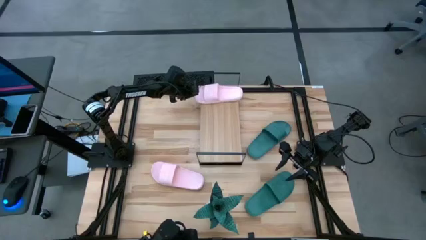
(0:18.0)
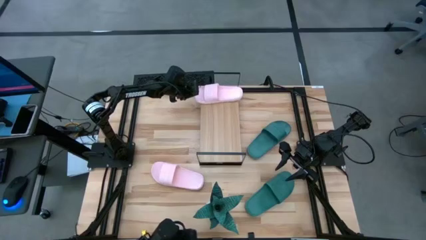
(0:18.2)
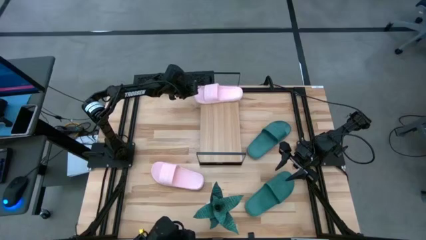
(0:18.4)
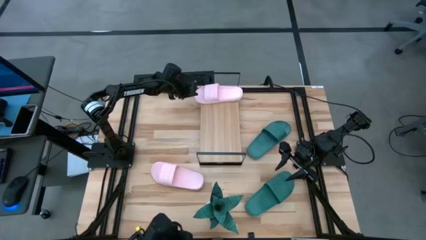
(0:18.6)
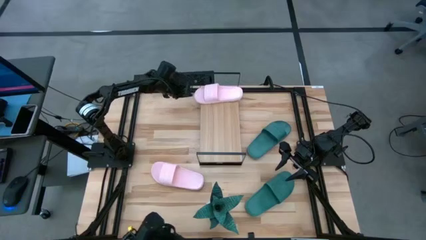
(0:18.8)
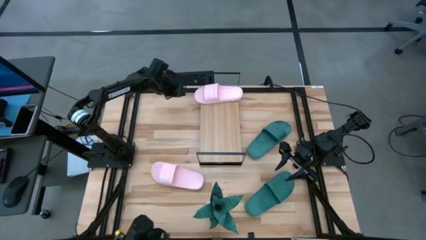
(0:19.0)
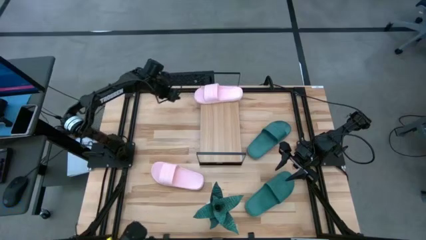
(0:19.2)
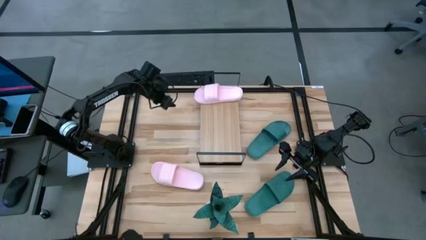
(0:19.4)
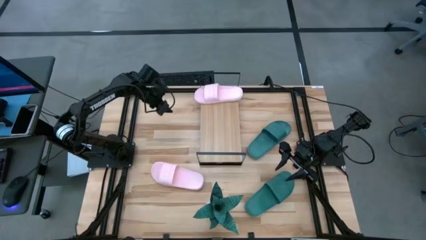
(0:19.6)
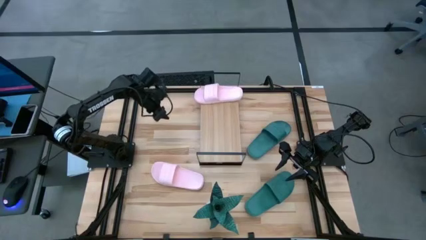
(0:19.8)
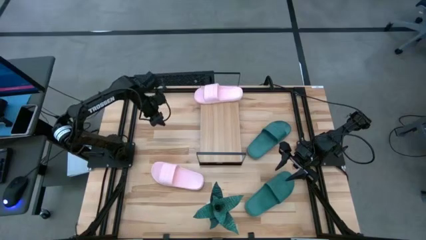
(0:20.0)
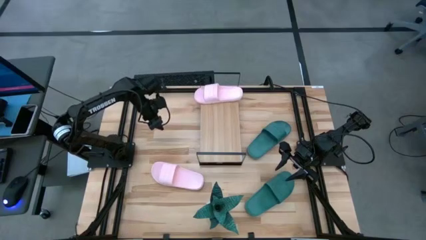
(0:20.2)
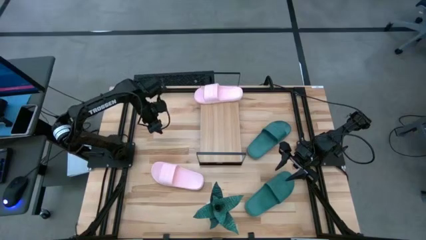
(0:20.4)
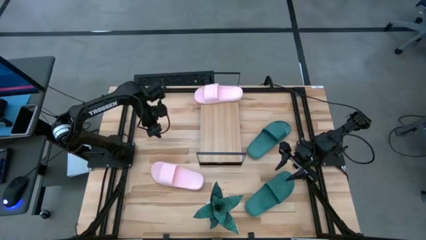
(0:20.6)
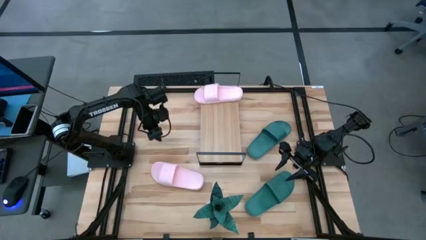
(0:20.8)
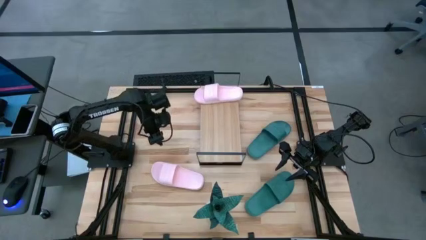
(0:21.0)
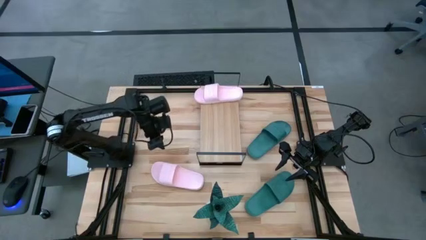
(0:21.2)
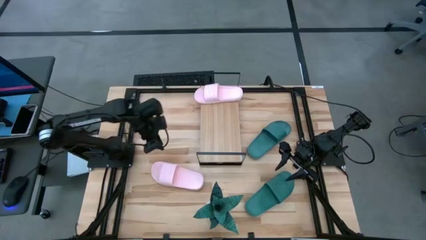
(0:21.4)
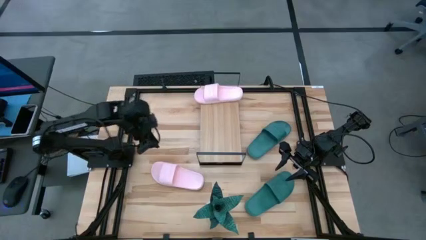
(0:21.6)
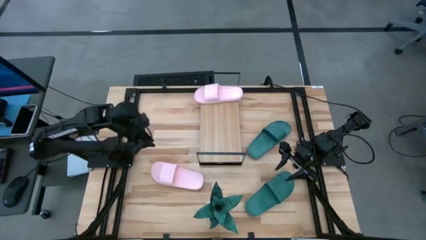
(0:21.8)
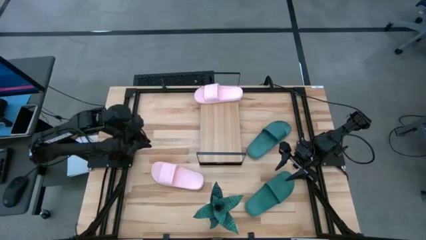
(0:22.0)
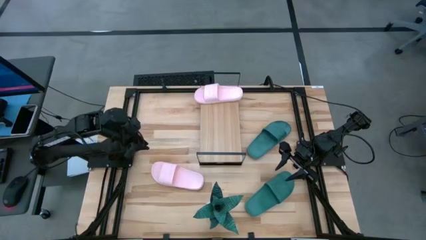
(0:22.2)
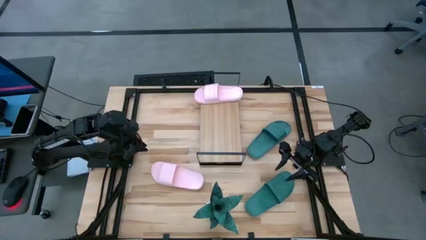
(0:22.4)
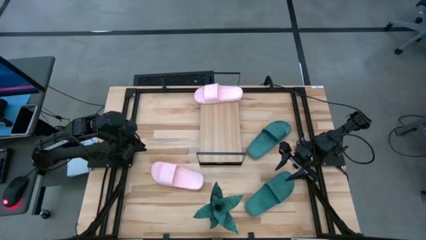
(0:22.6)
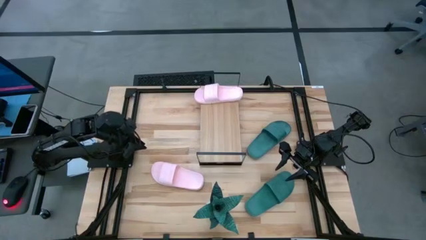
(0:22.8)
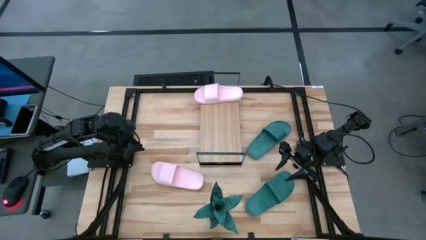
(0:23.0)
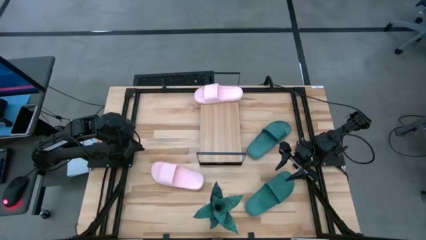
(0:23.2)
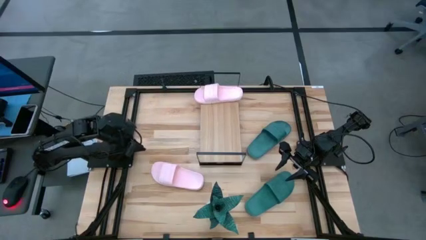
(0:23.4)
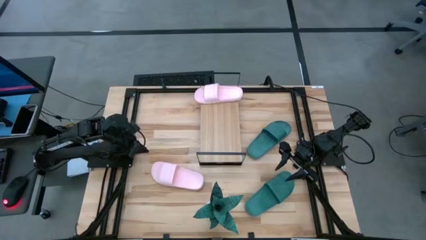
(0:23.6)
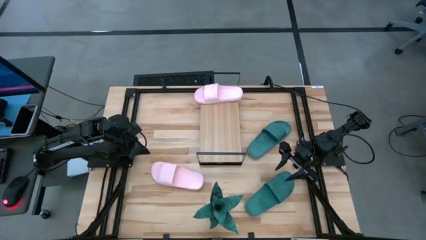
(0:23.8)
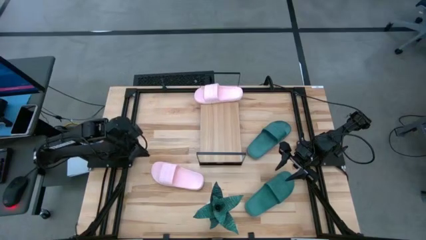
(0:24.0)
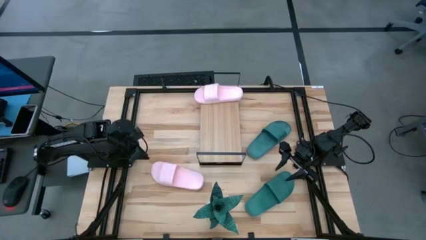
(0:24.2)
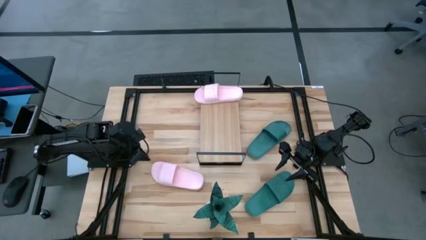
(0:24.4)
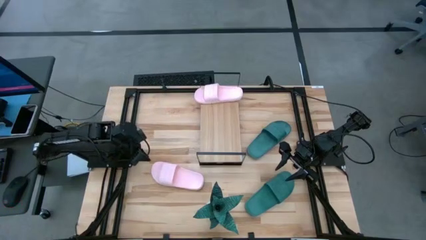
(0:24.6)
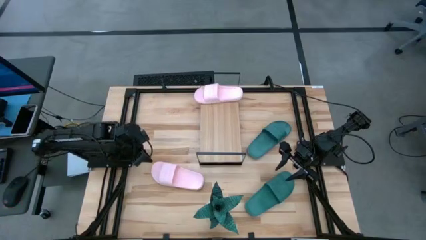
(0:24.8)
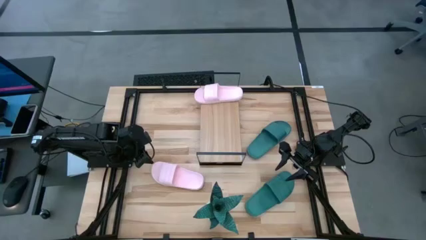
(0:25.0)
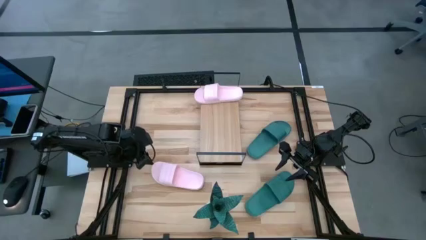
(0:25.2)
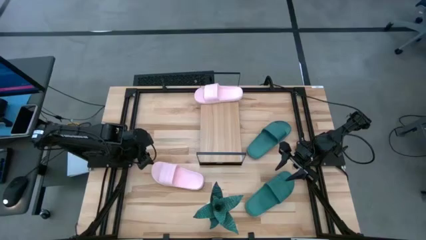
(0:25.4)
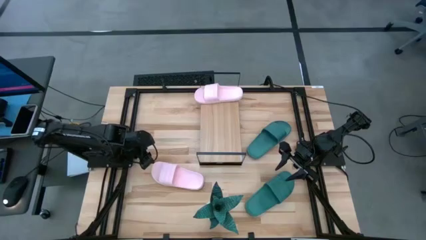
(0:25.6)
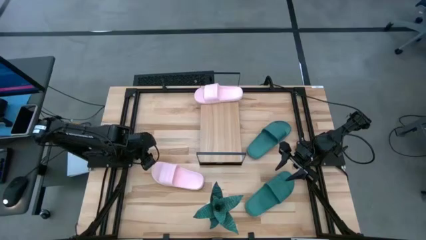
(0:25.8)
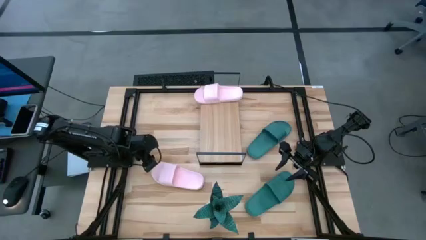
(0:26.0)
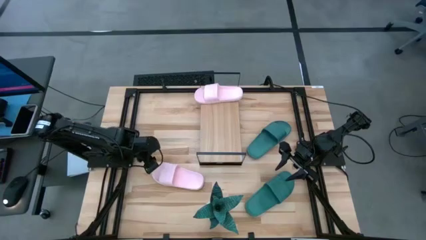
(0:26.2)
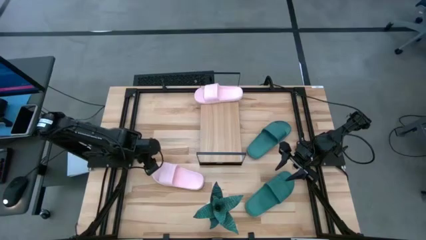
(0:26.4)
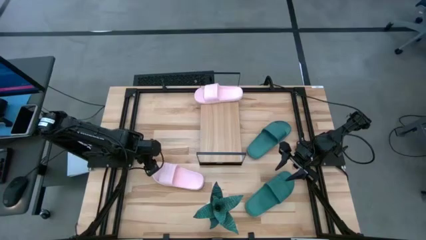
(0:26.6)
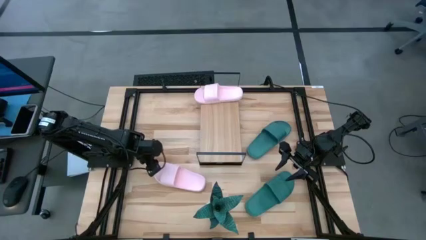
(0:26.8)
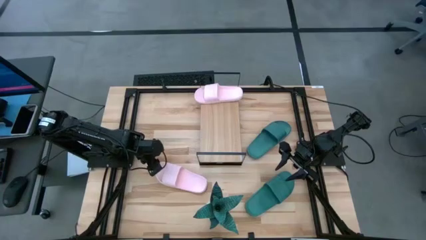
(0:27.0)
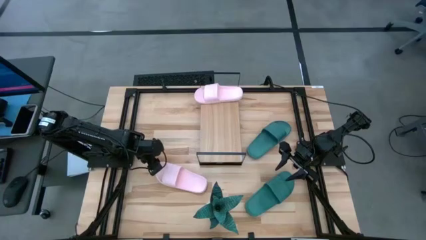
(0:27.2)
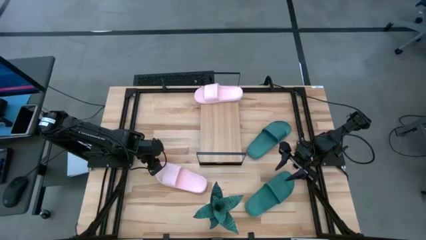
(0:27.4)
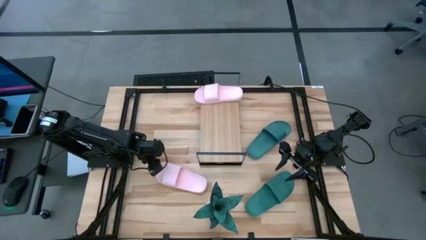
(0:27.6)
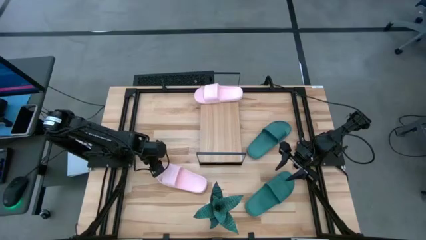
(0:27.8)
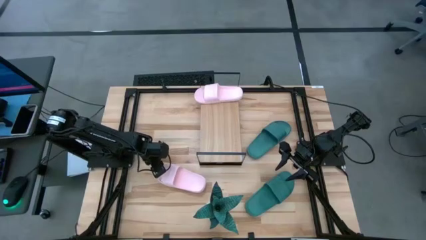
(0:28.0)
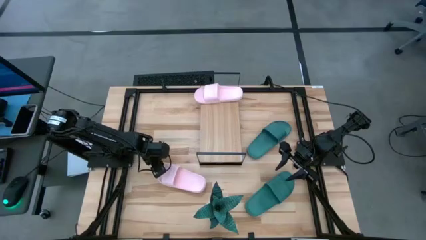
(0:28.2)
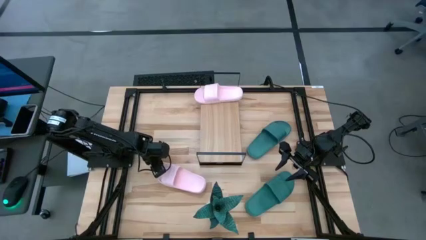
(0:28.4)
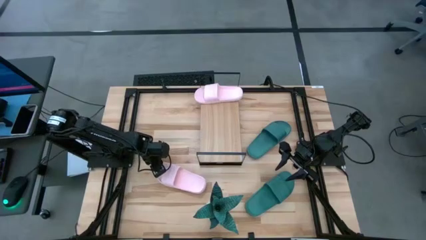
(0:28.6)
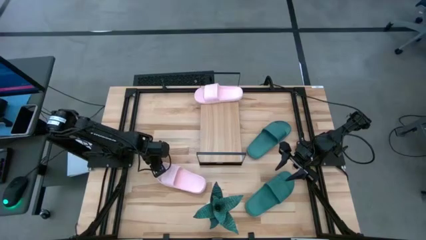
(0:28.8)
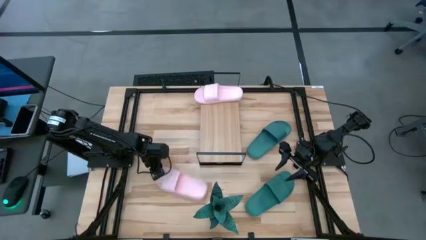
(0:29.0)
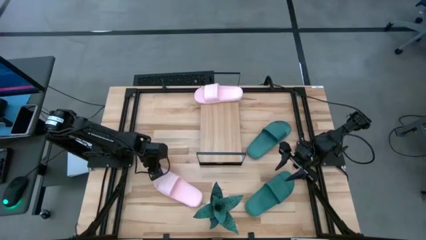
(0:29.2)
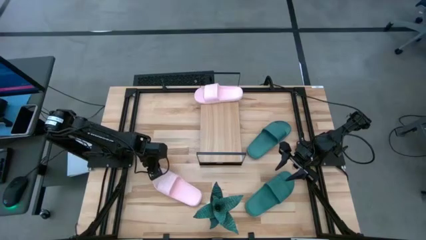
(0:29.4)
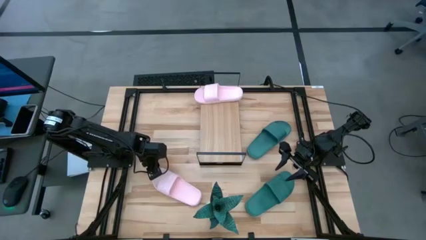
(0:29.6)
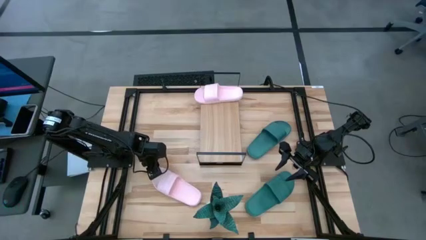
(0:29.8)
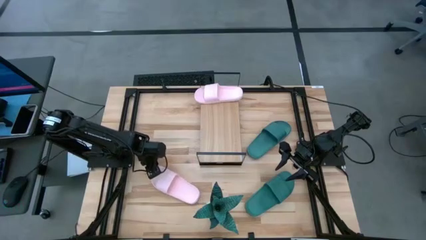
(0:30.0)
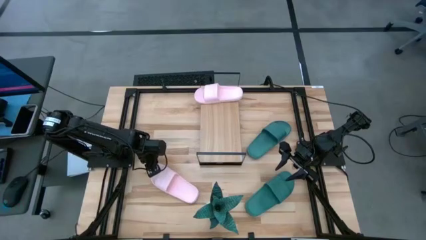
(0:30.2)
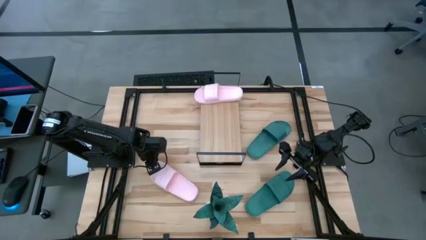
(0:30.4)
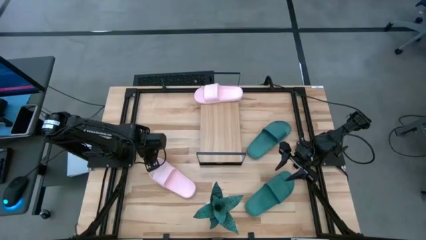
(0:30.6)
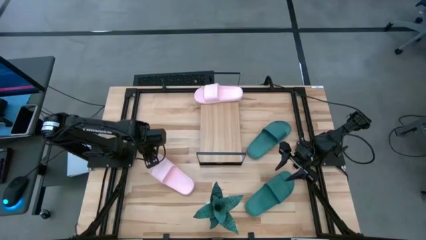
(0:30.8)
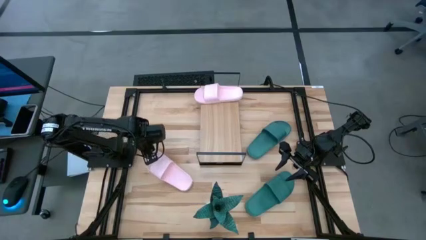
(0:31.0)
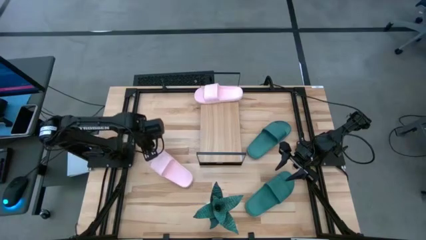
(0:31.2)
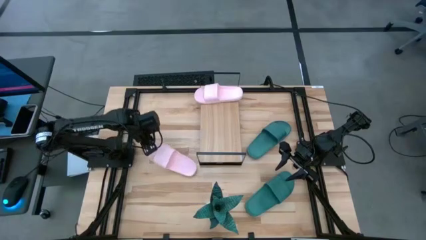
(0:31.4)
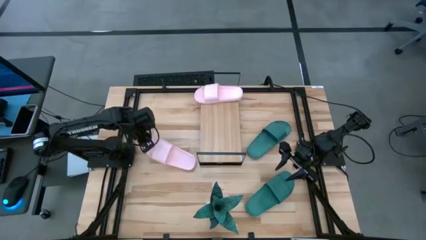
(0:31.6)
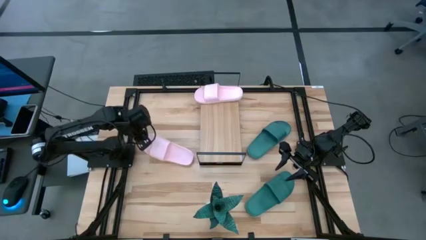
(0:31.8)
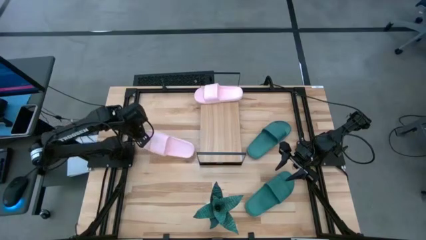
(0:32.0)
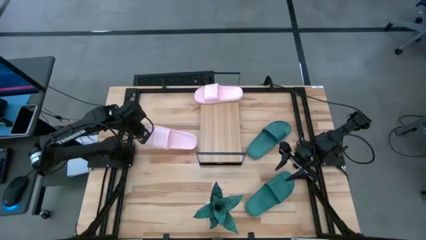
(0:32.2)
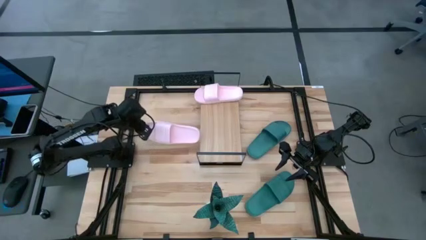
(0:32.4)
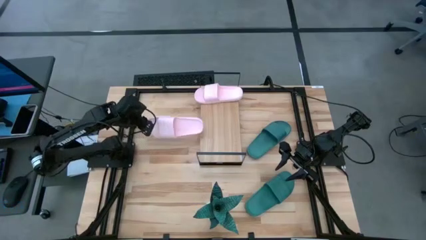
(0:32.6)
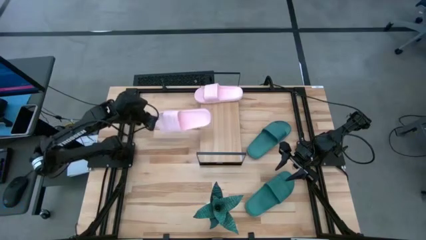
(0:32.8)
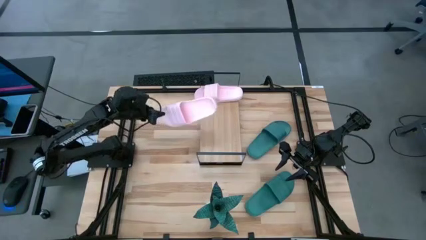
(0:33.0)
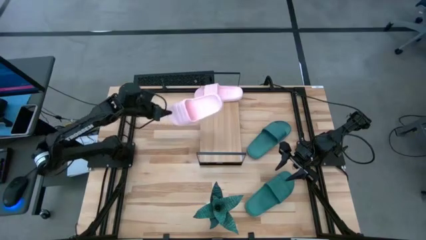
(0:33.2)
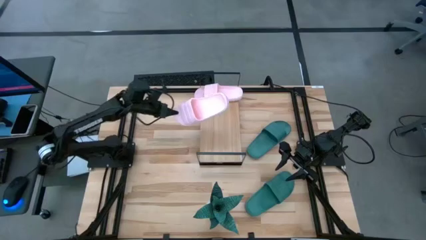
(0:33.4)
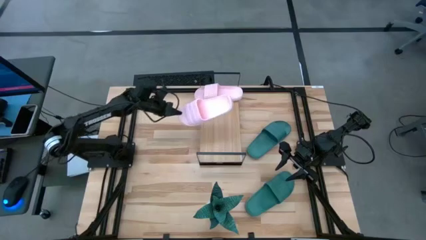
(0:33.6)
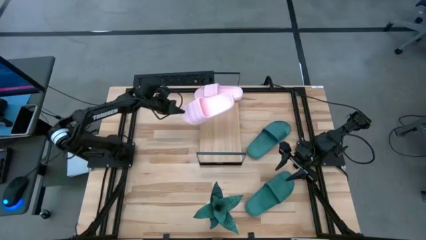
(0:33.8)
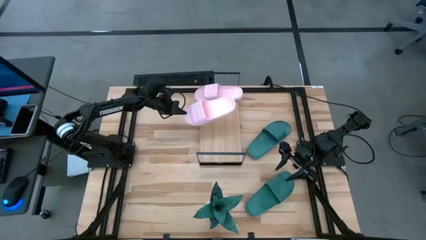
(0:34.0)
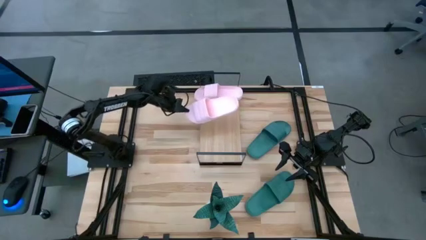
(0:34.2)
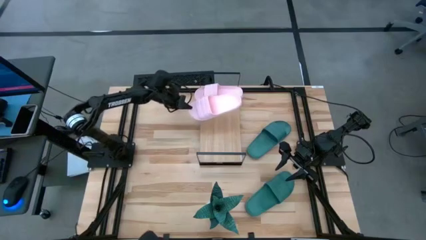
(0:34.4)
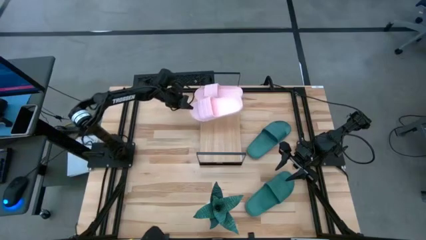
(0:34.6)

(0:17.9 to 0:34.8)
Task: Pick and place slides into the shelf
Put the pink slipper on the shelf
